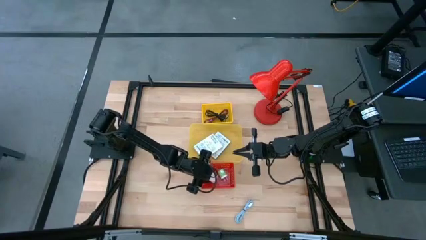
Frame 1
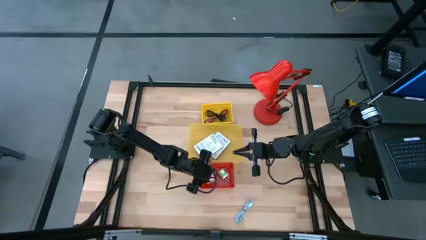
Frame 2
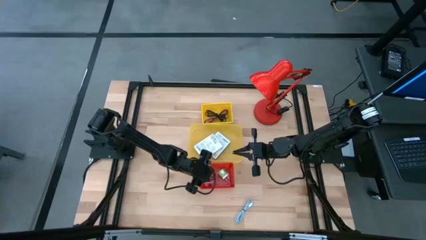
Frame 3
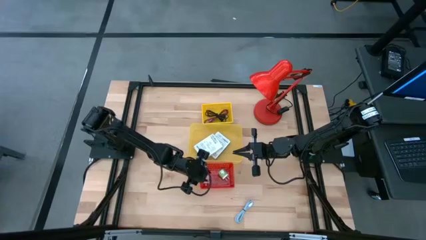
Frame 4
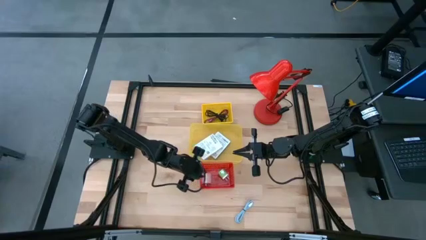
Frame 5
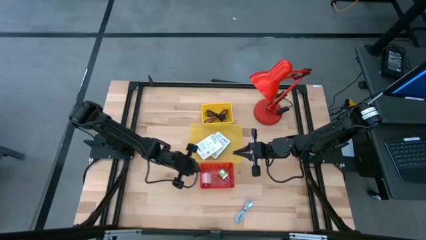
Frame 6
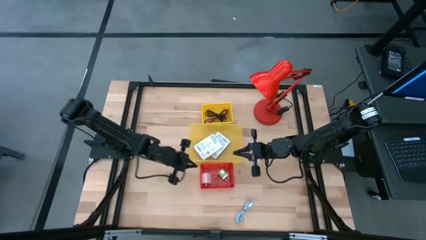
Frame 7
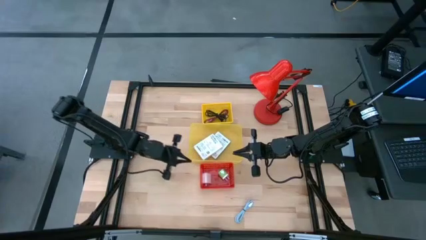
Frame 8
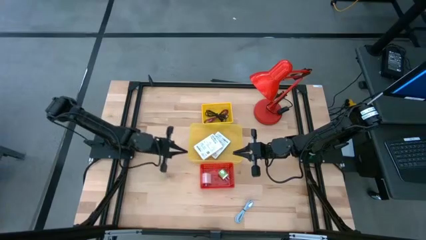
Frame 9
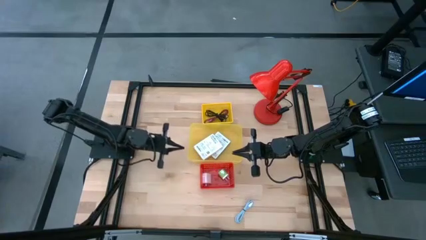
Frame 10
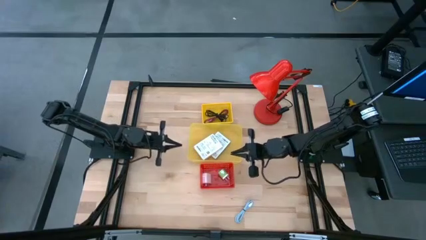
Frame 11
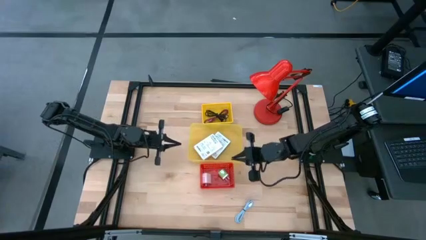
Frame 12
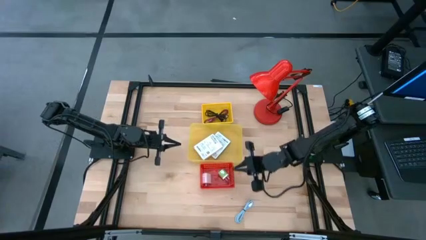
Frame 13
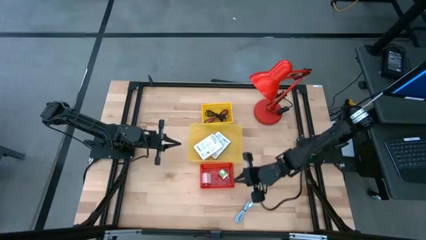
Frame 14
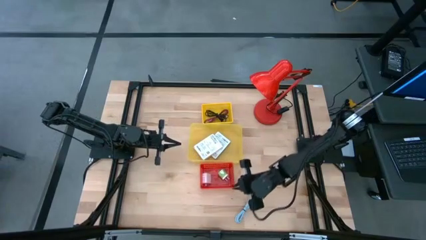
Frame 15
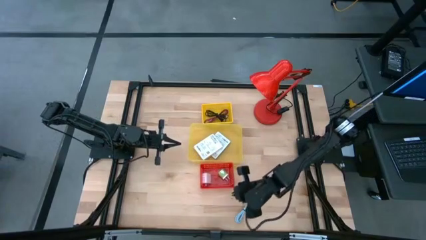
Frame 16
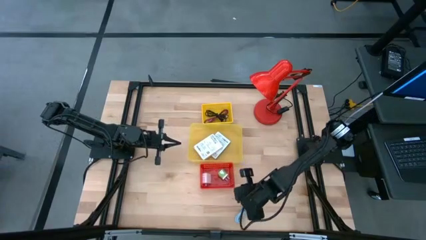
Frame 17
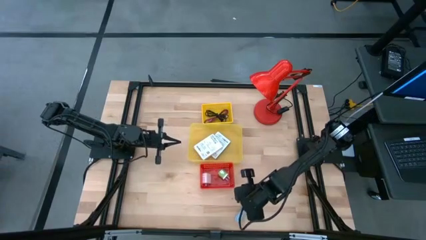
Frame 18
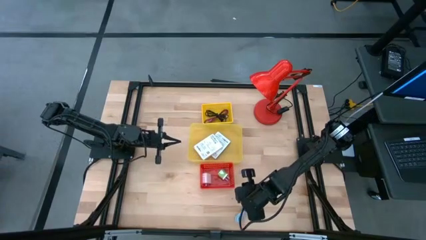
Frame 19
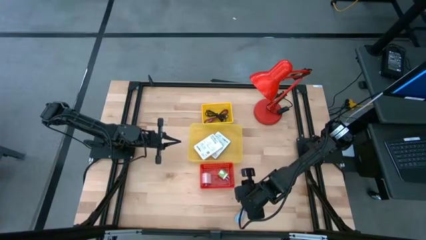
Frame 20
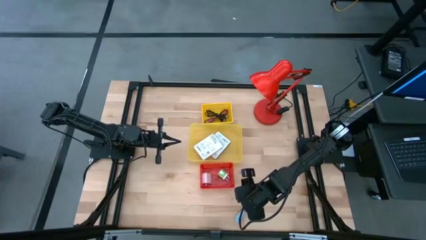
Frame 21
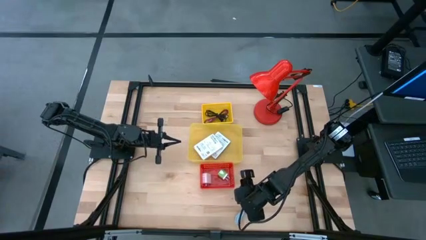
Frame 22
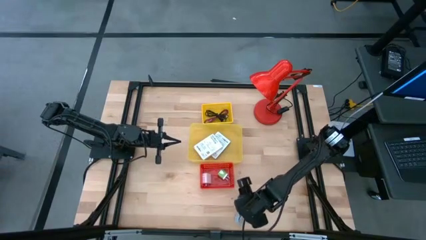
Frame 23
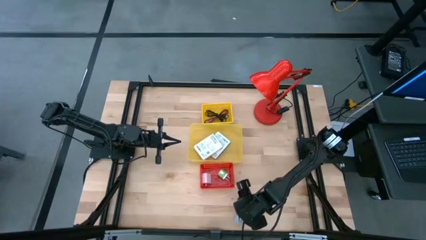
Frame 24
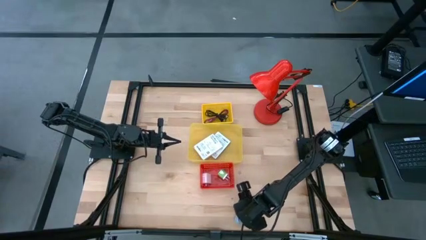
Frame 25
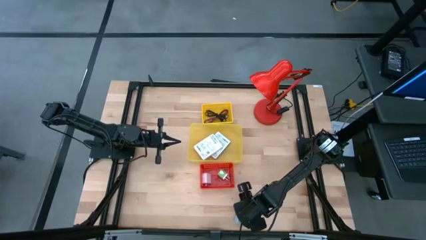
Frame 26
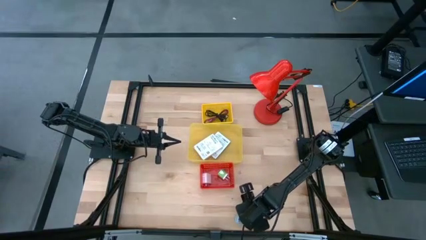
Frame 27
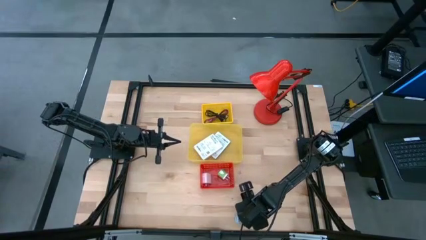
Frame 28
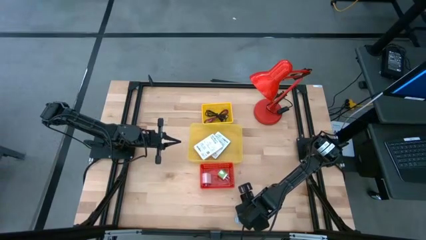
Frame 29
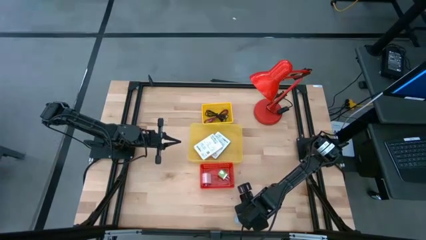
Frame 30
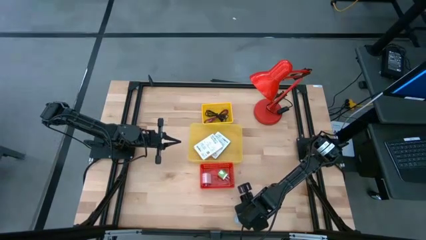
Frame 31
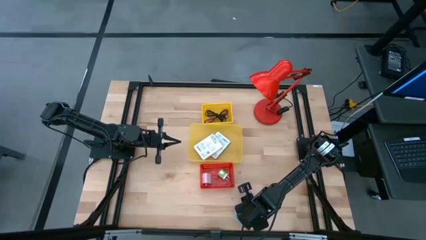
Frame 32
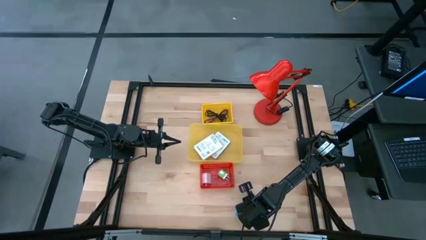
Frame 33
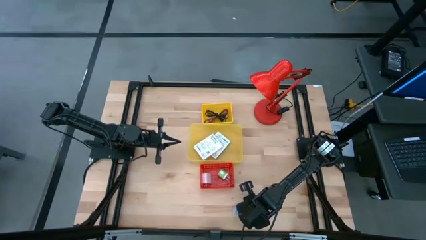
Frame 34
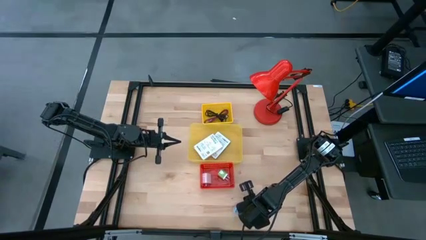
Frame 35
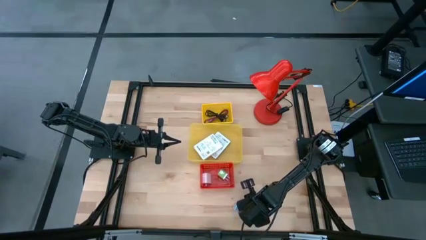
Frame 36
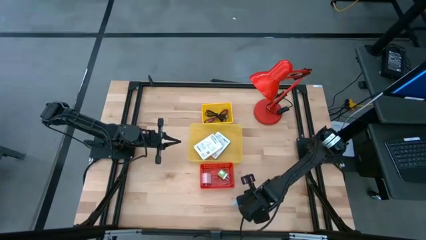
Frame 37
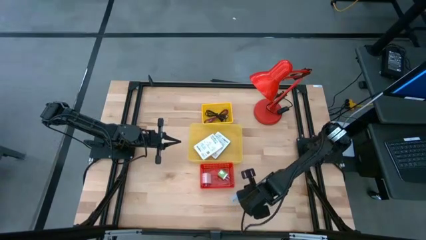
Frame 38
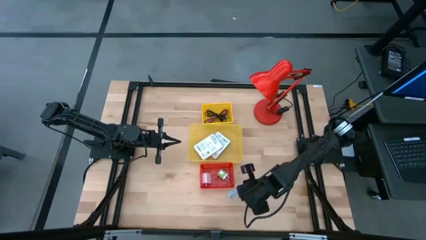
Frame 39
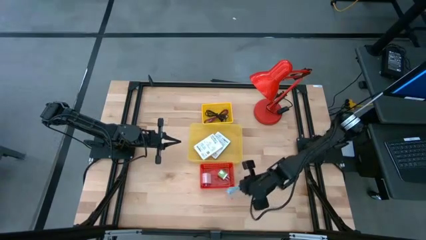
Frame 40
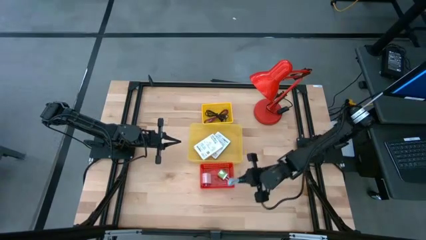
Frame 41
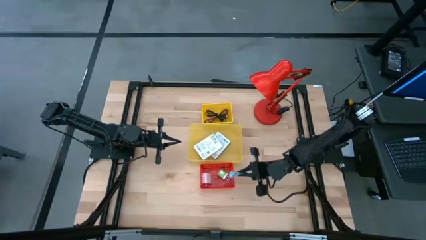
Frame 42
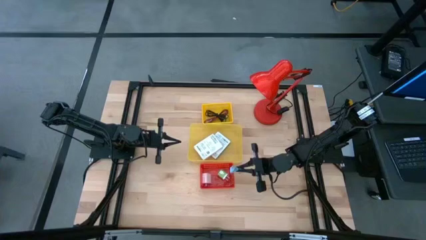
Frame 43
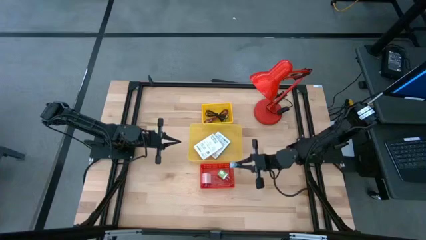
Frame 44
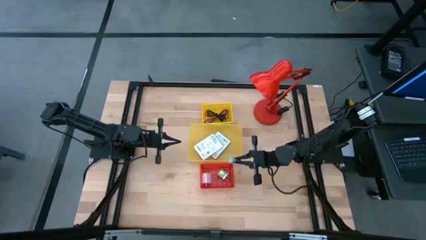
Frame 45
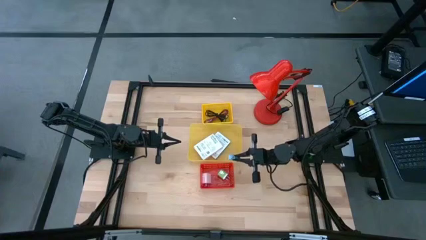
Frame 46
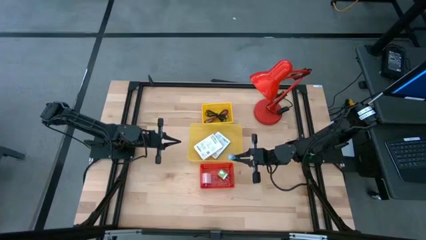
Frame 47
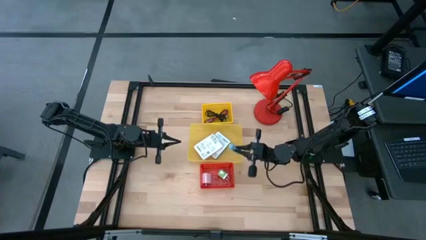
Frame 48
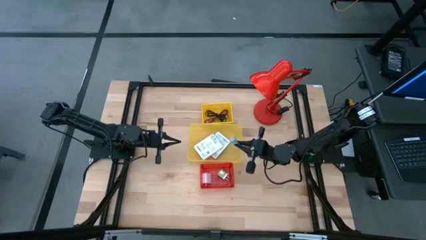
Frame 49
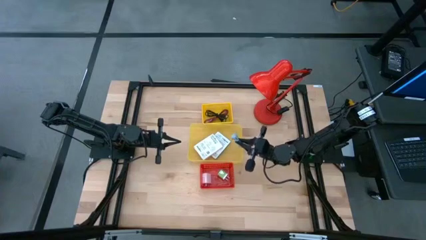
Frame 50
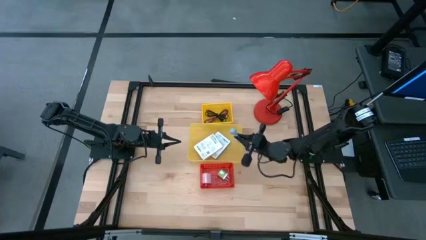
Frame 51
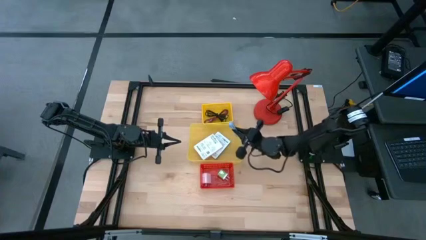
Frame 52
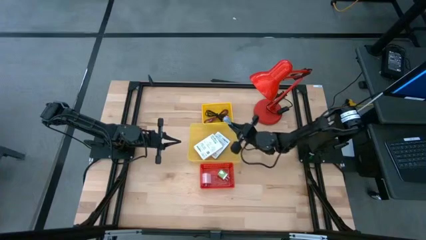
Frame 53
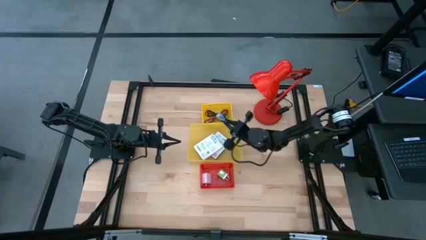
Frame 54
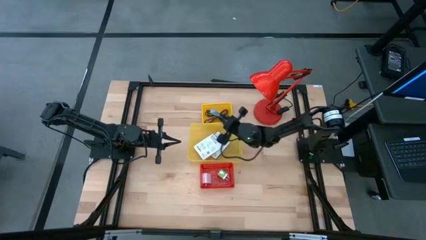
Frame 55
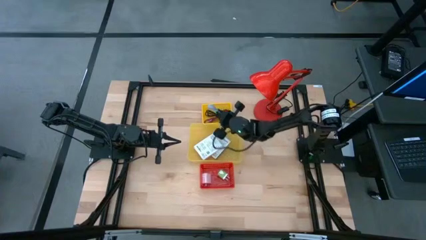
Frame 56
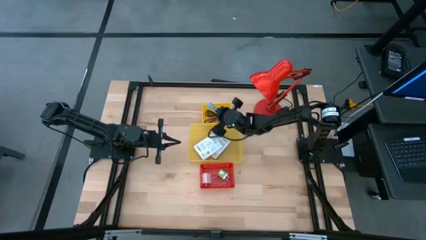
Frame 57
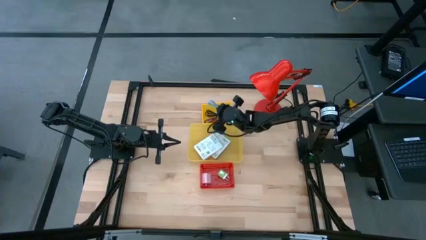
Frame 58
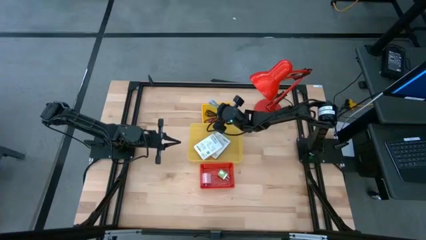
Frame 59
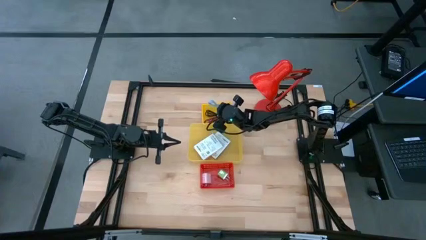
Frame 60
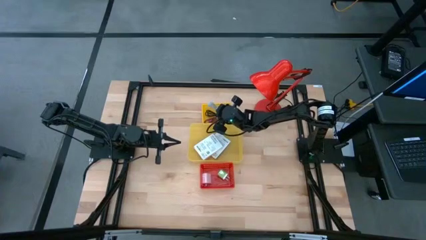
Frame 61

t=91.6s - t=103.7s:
Task: Pick and place items into bin
Put the light blue charger cable into the yellow bin

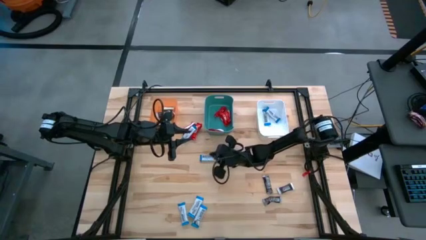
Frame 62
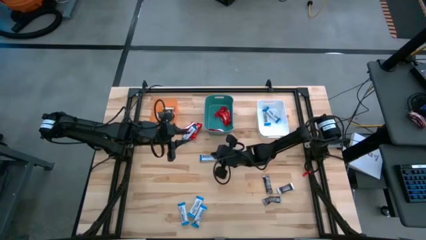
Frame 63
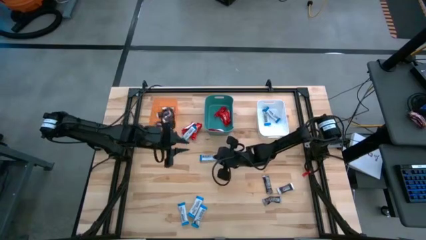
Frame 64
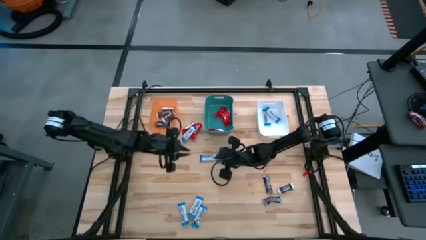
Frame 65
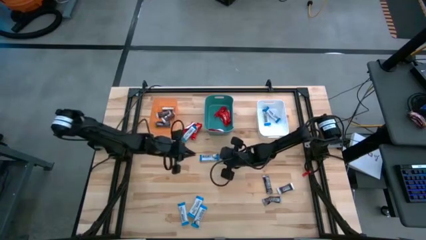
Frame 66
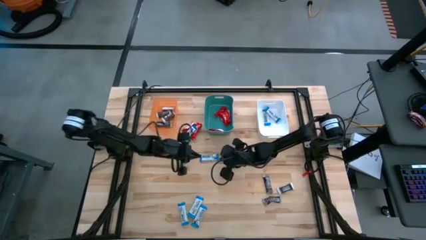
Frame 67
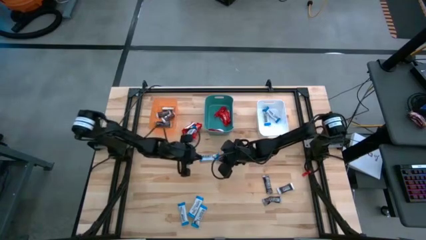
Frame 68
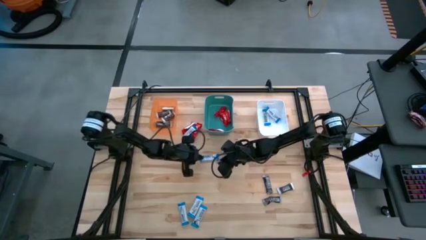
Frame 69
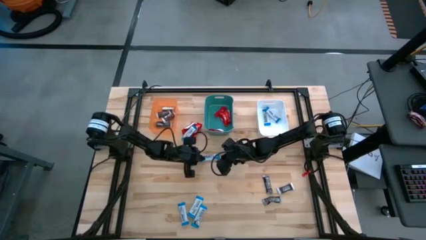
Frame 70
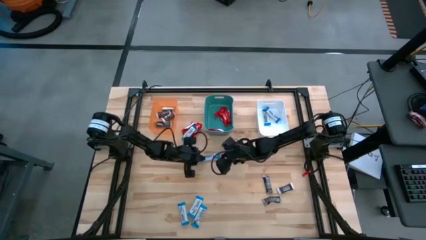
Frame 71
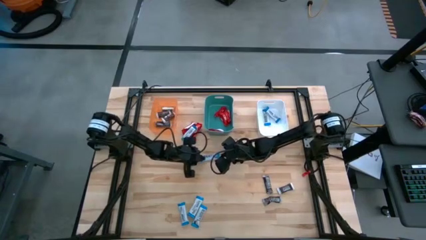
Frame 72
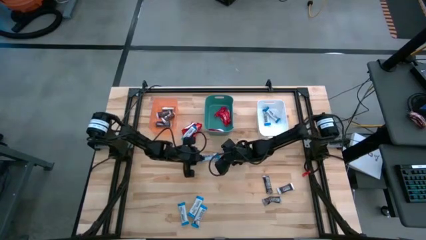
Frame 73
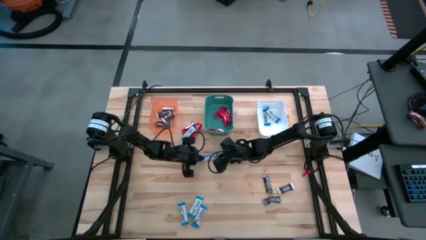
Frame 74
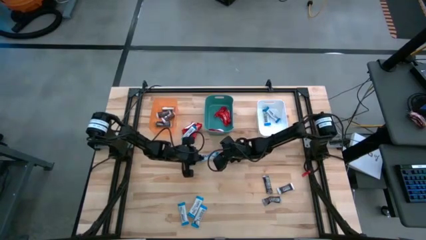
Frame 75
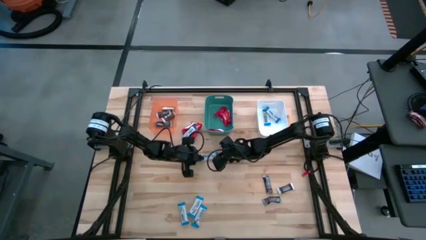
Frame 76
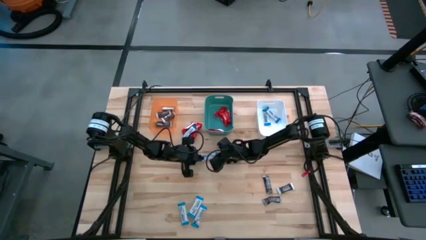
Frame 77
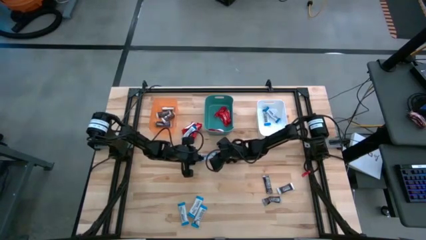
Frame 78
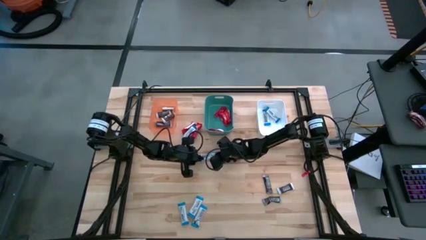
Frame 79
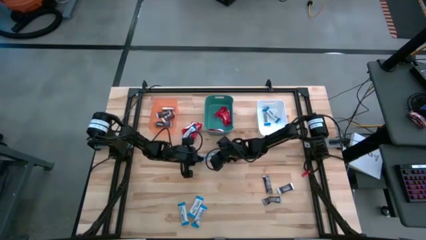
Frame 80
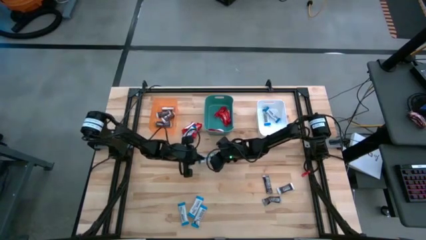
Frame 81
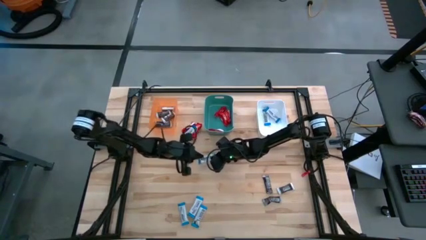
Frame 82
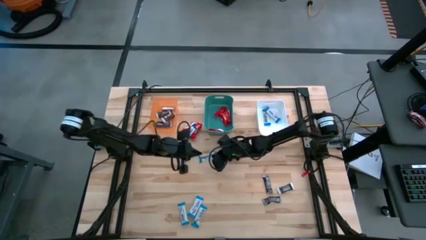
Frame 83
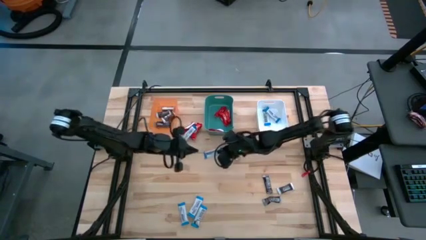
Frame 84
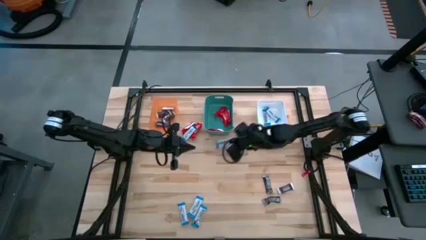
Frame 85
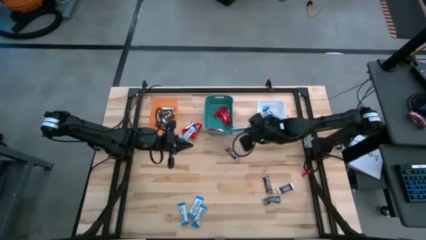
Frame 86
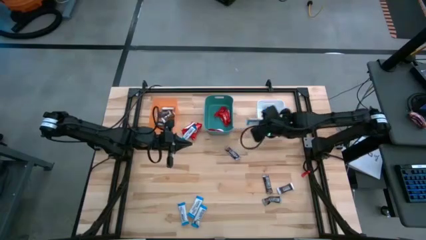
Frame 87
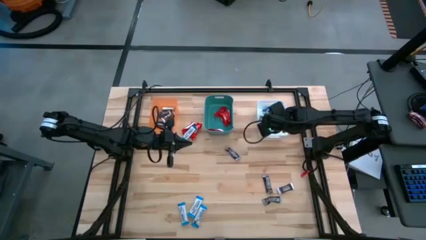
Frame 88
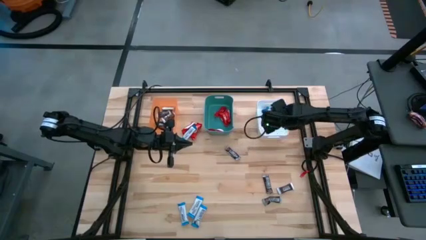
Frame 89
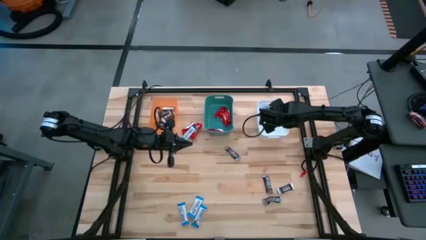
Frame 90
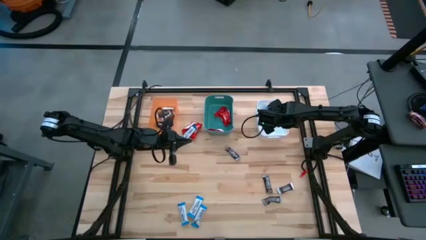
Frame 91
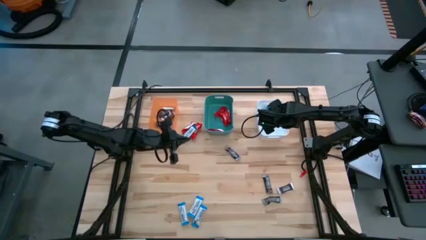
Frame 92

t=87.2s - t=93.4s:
Task: Organize candy in baskets
Put the white chocolate bar into the white bin
